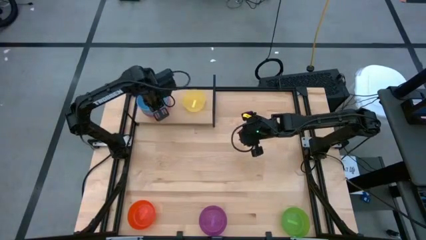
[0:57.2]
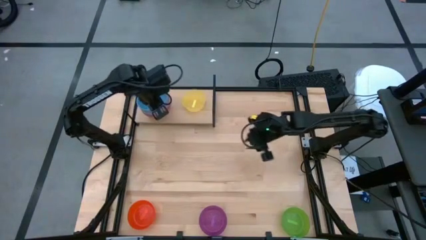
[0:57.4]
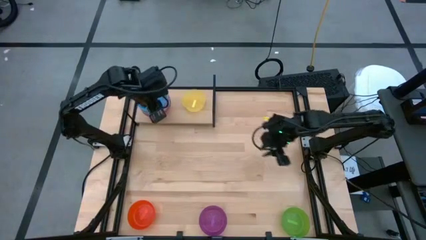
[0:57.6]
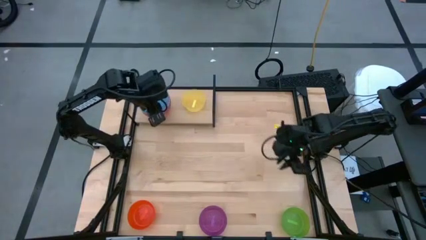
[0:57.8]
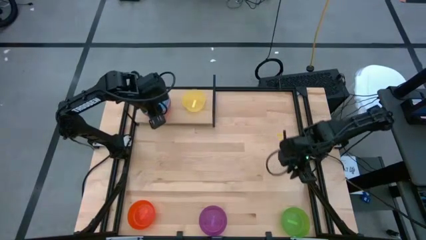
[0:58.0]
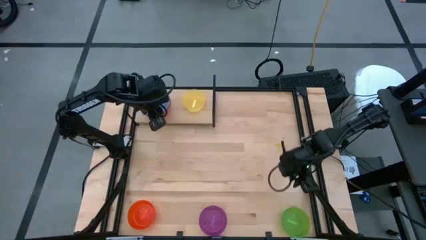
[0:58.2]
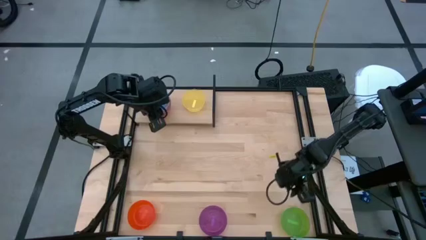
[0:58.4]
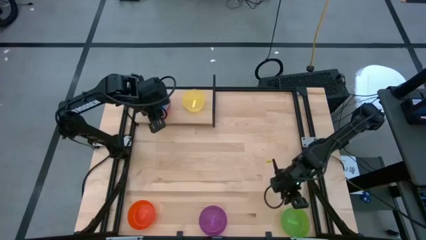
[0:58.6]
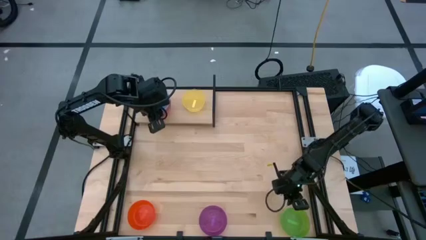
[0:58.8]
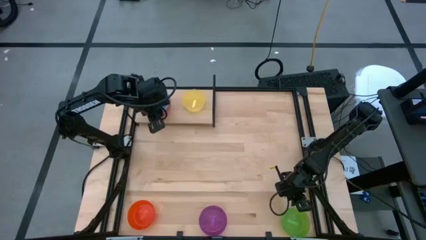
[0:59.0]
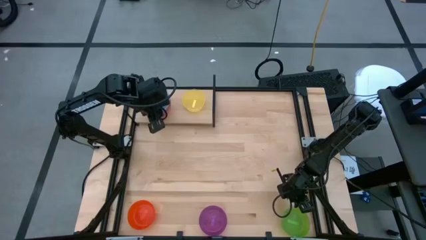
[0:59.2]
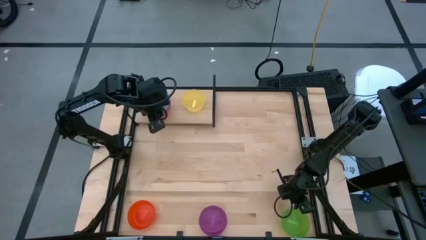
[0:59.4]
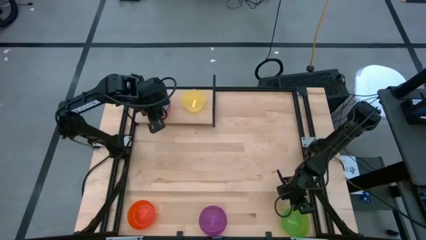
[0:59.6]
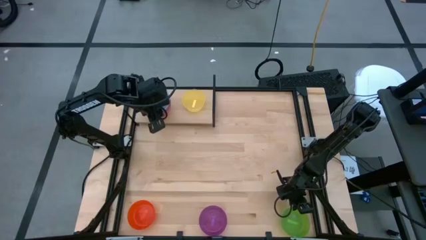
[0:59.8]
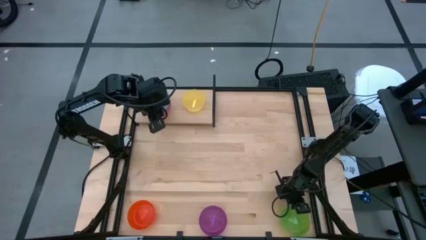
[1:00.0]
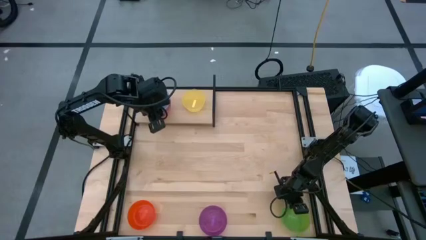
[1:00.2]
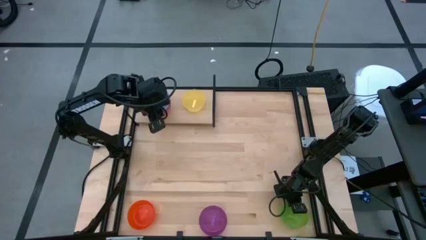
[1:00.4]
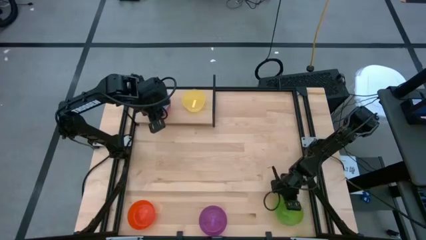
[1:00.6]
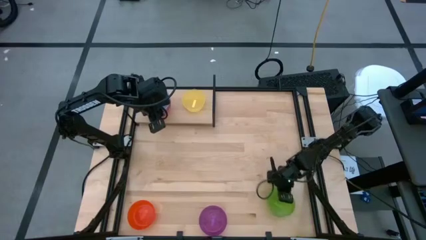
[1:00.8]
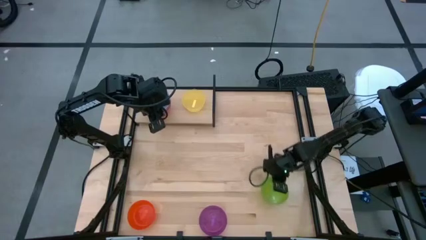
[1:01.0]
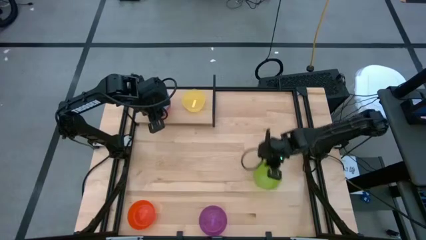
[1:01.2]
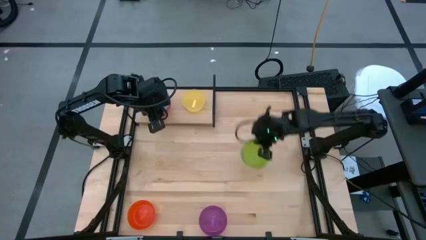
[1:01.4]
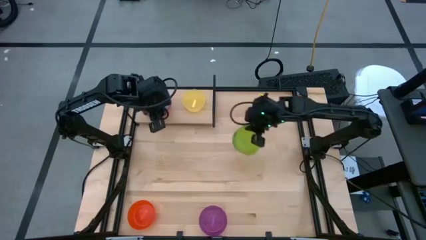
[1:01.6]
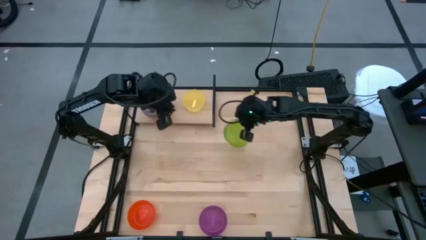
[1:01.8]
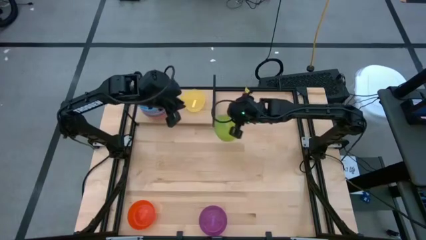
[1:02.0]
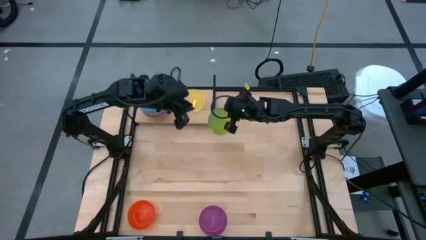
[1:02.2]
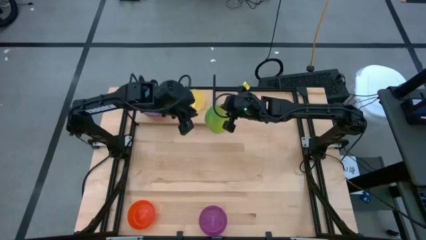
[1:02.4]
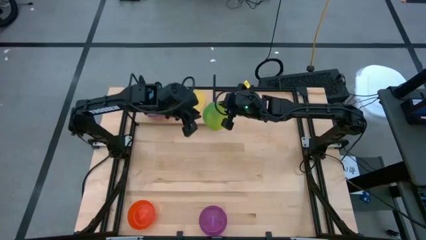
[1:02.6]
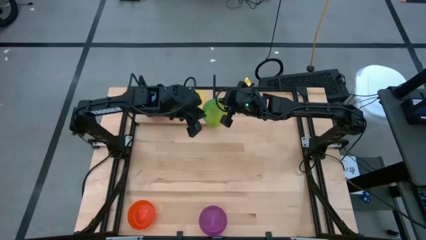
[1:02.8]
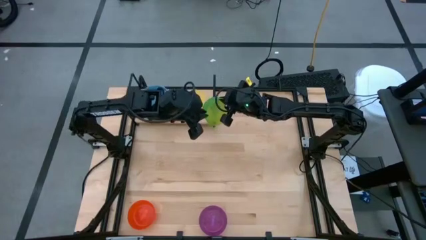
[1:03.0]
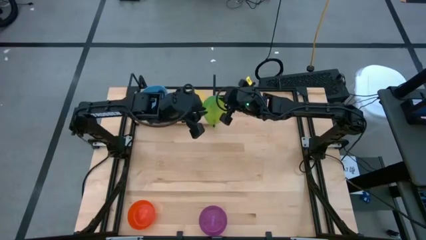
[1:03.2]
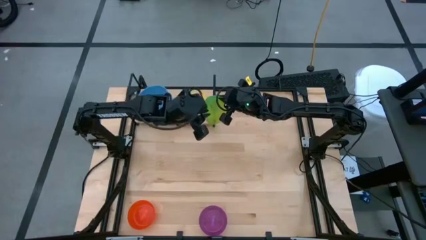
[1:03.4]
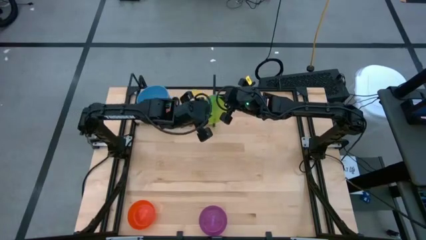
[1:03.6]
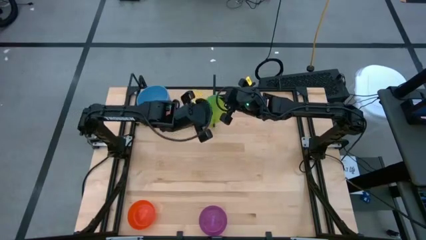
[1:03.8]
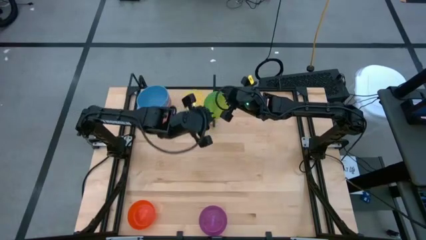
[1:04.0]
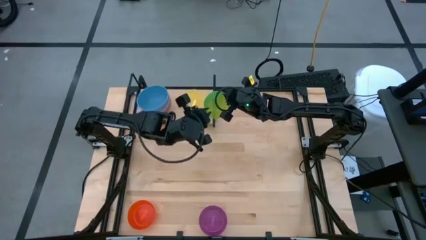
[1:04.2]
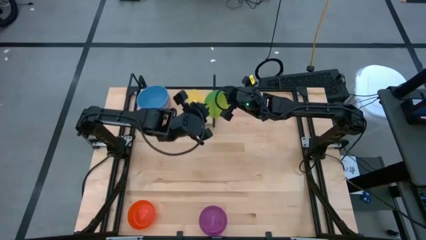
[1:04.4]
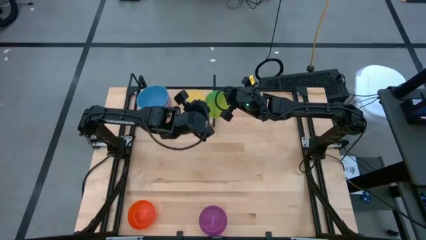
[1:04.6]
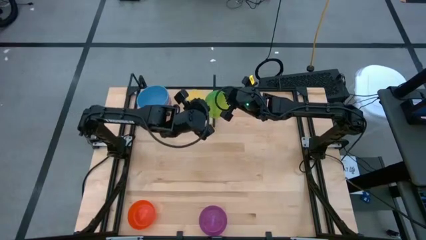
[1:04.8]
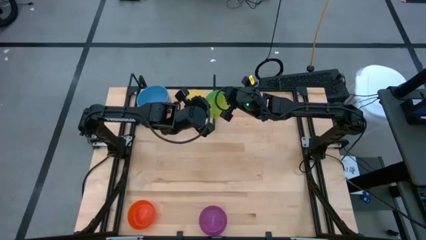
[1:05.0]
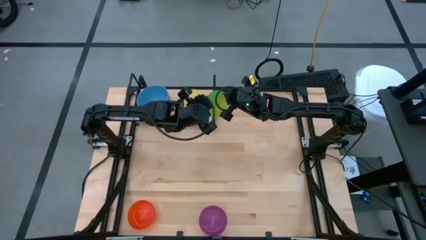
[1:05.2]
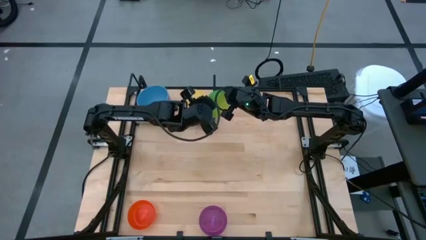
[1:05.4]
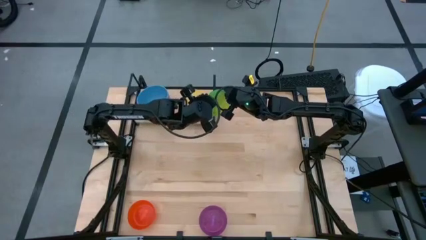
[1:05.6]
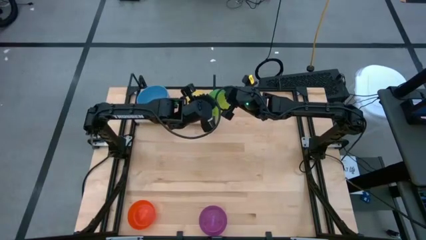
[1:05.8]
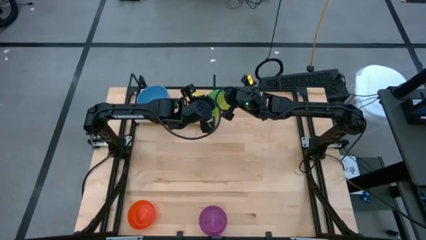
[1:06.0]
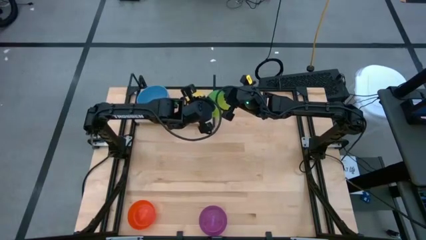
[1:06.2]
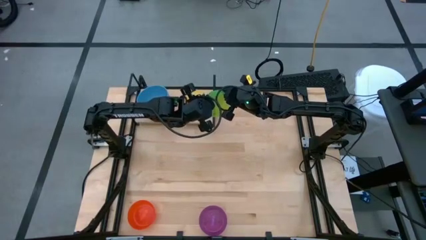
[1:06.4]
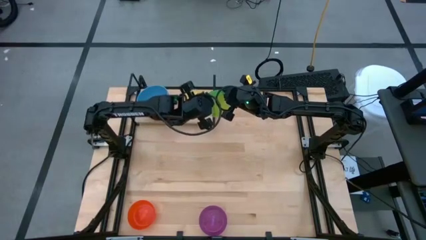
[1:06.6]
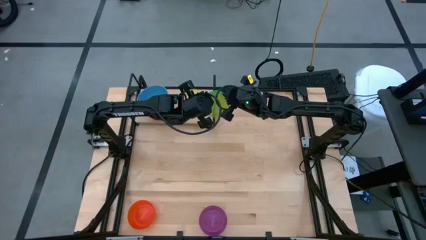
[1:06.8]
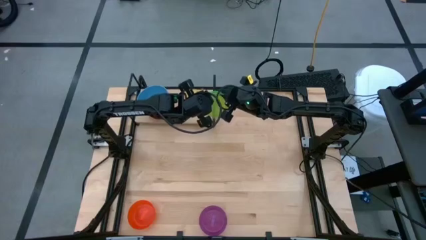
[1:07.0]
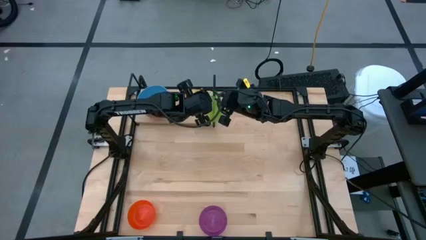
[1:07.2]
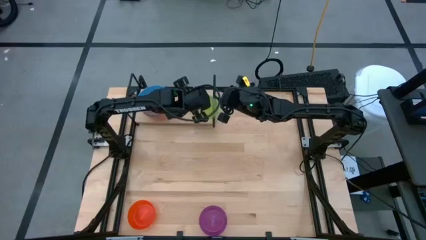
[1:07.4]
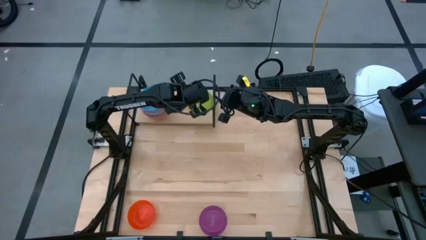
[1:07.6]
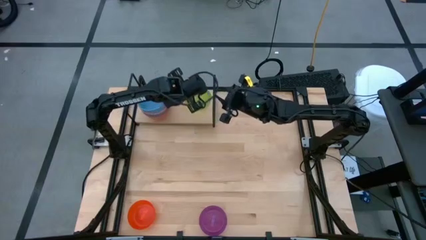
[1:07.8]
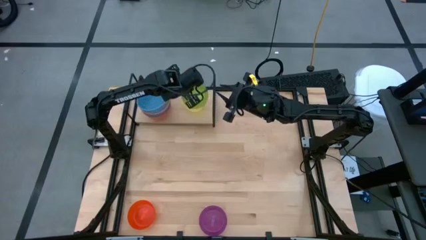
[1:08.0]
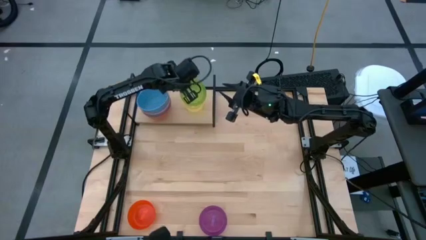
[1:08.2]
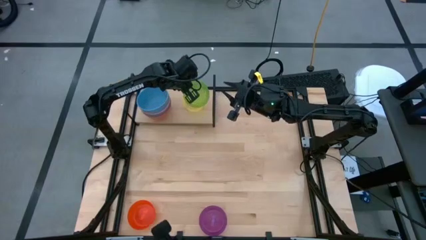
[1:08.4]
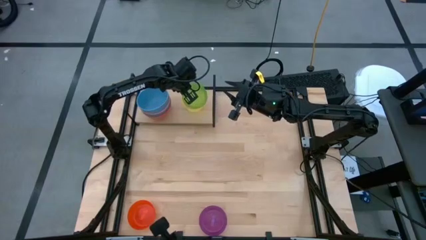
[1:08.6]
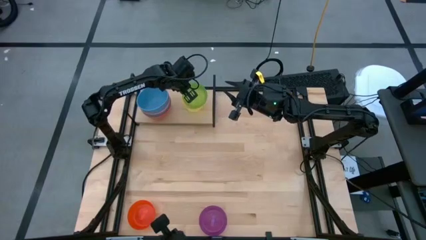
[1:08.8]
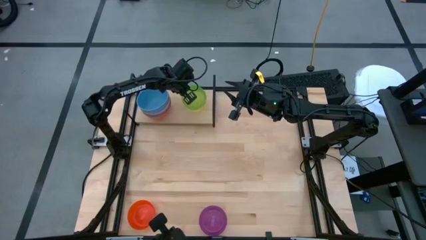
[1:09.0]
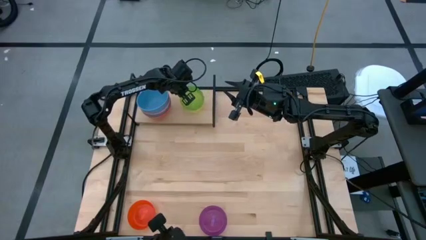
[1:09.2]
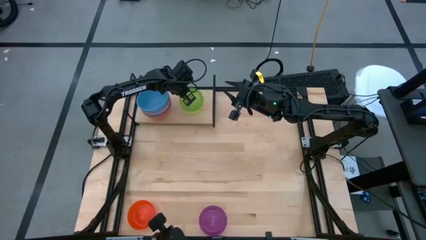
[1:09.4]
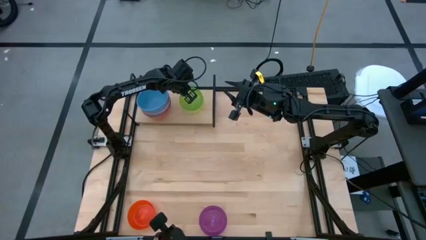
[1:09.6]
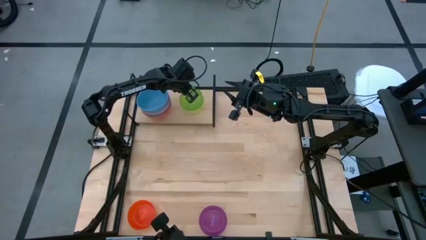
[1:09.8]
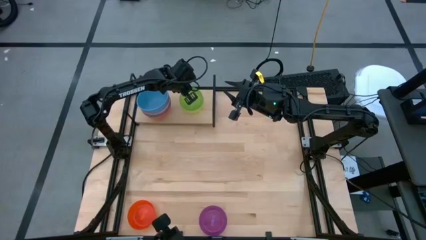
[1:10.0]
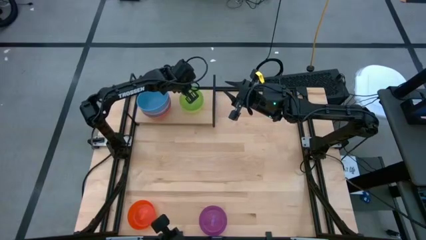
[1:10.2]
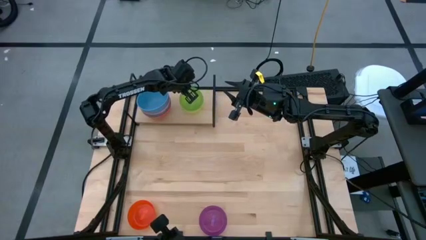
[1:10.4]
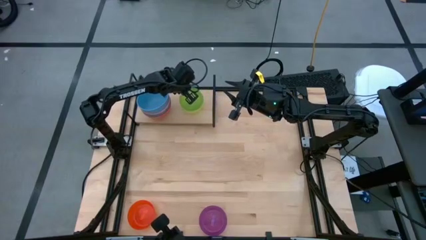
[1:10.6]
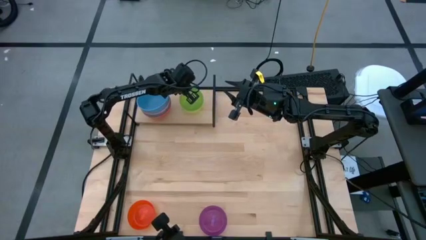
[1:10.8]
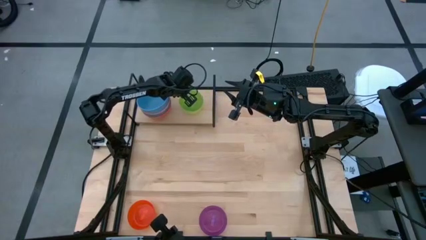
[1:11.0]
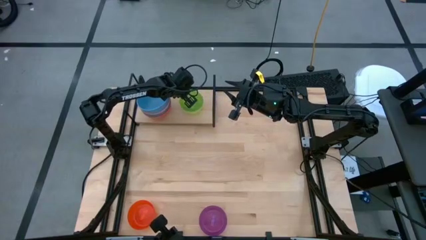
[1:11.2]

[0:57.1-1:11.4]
Task: Place and stack bowls onto a shelf
Stack the transparent green bowl on top of the transparent yellow bowl on the shelf

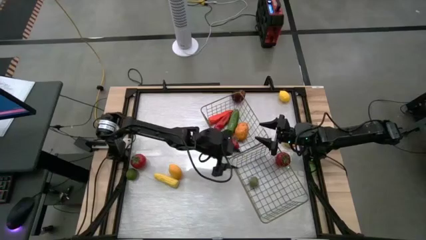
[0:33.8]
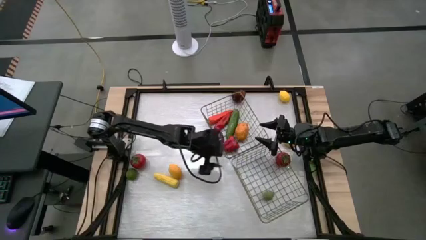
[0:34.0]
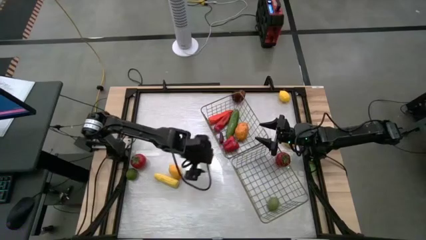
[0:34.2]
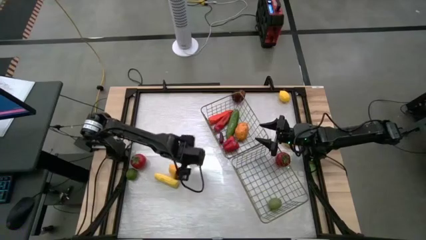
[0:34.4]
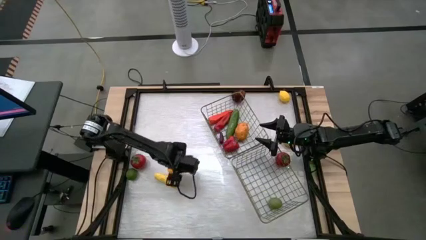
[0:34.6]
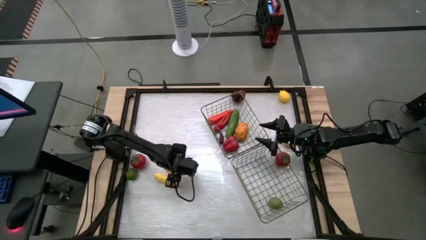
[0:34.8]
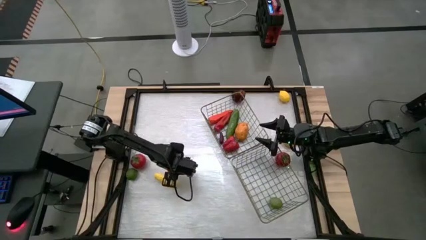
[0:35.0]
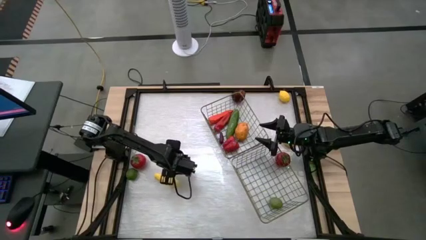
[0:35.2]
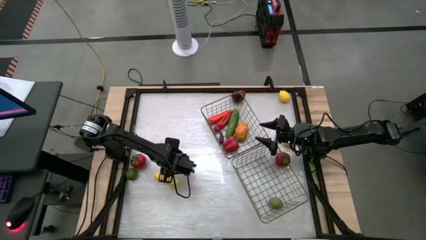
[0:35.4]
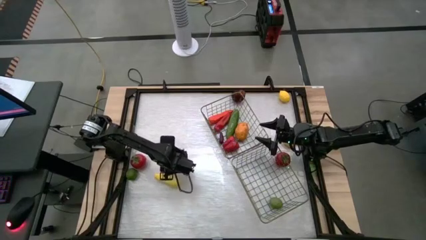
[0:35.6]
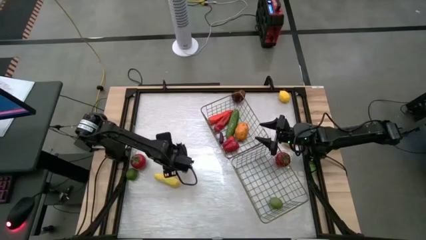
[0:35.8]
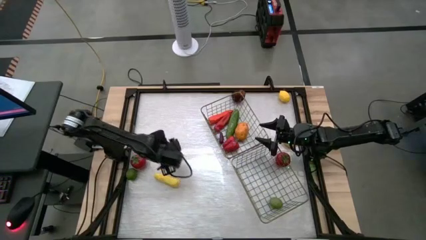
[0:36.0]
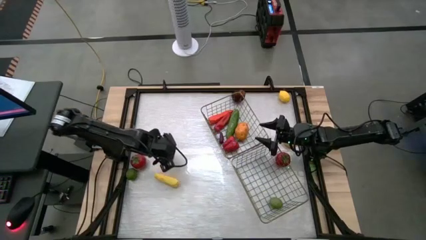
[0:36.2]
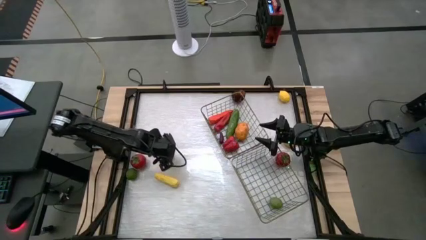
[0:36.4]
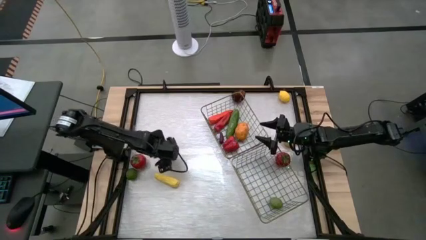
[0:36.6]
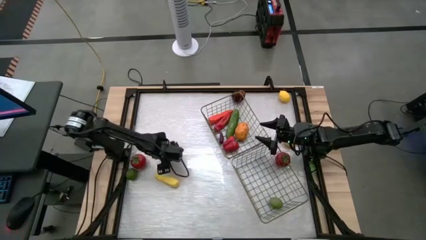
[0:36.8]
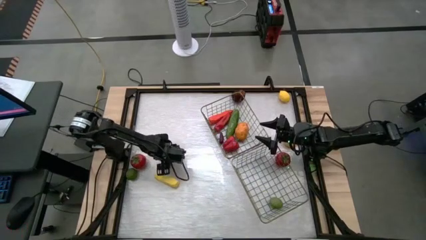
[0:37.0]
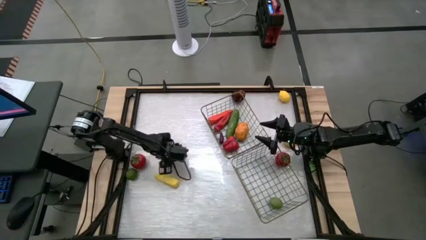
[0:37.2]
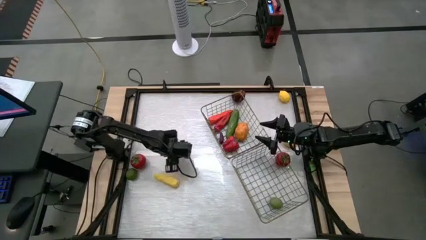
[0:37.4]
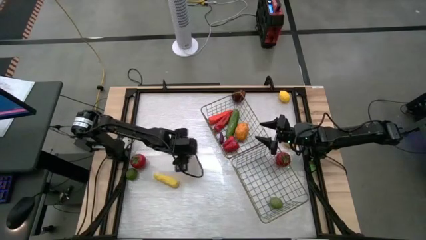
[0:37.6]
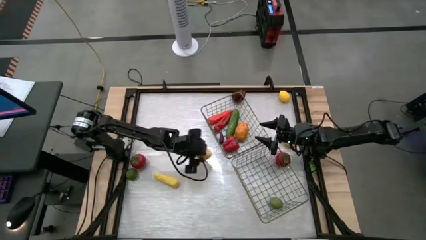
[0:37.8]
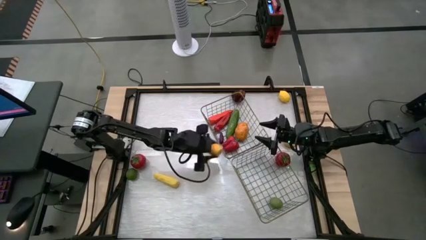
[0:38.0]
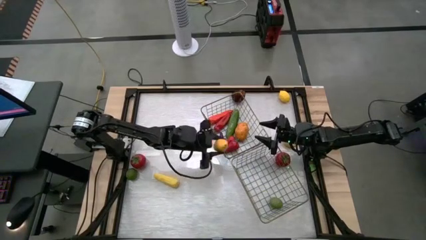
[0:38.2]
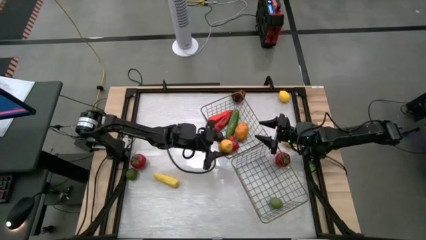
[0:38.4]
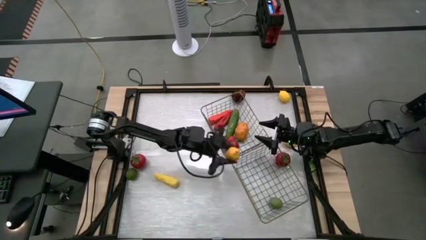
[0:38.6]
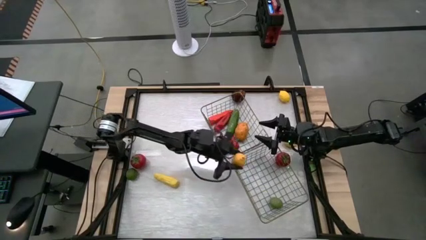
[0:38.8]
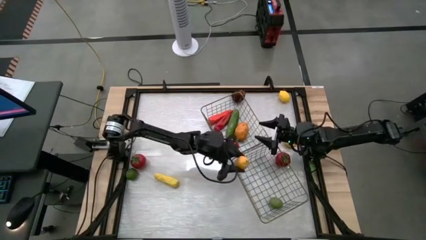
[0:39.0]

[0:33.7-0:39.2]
Task: Sort produce into baskets
Put the bottom left lime into the right wire basket
